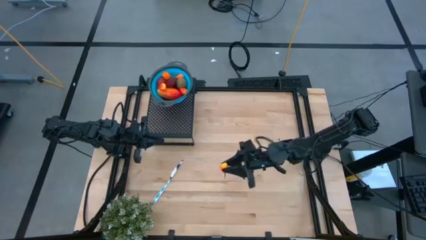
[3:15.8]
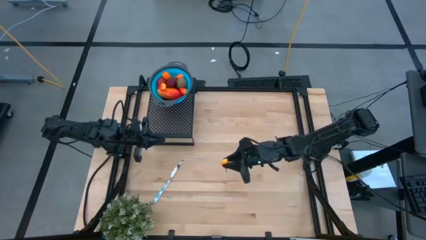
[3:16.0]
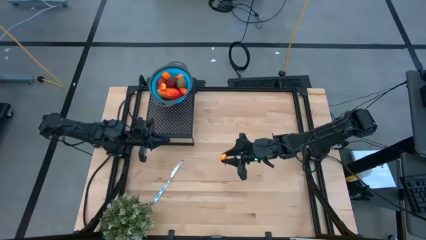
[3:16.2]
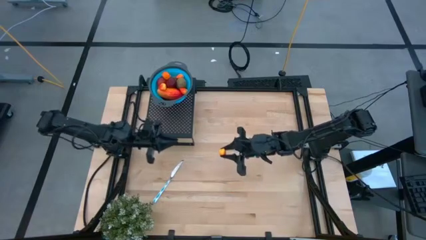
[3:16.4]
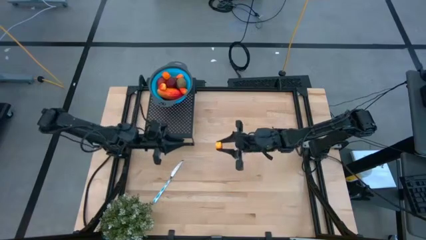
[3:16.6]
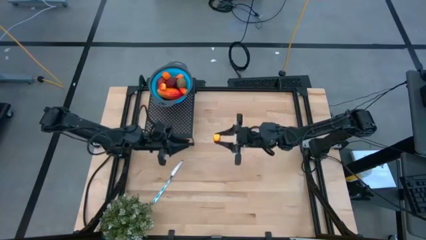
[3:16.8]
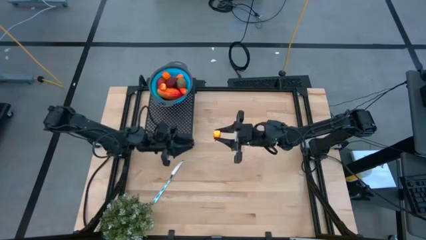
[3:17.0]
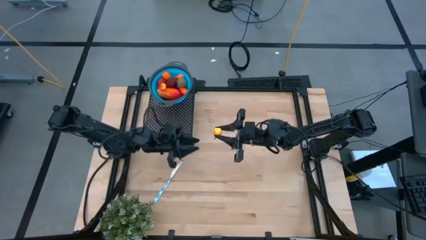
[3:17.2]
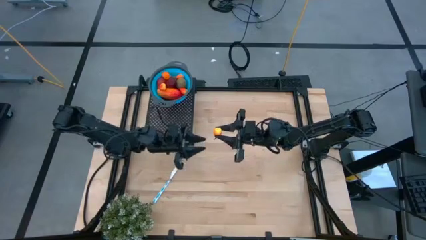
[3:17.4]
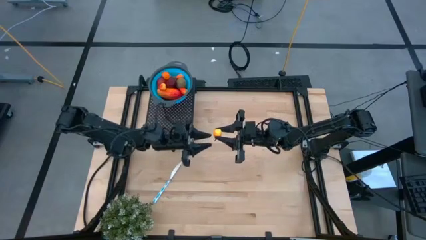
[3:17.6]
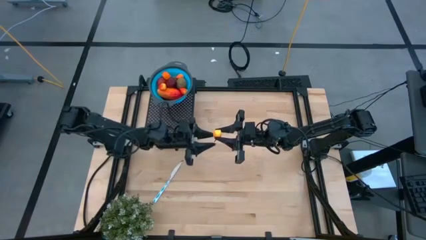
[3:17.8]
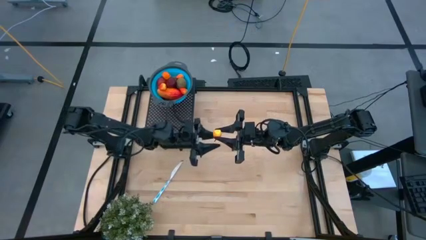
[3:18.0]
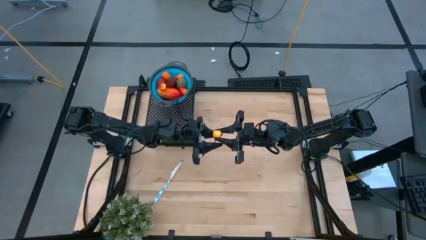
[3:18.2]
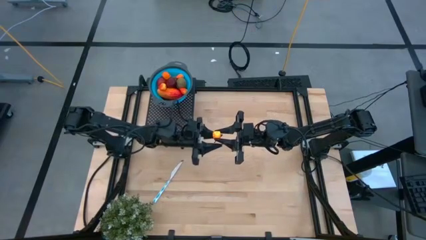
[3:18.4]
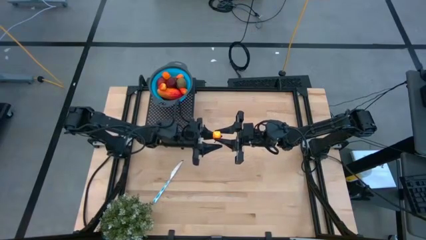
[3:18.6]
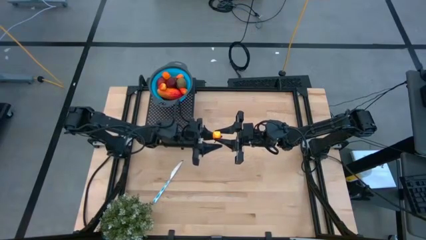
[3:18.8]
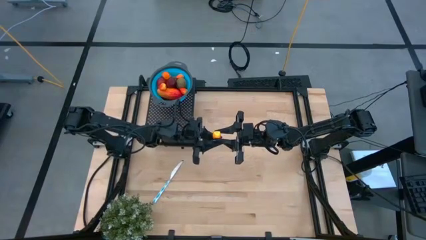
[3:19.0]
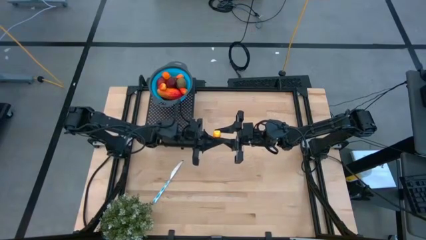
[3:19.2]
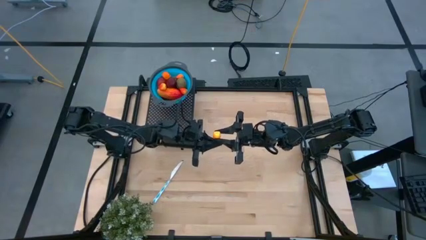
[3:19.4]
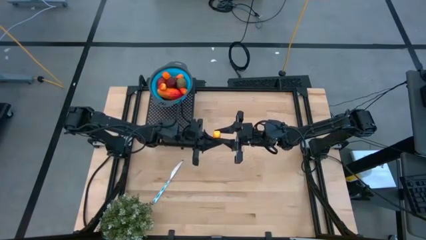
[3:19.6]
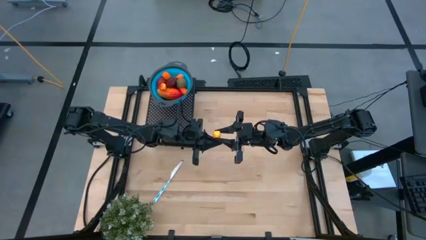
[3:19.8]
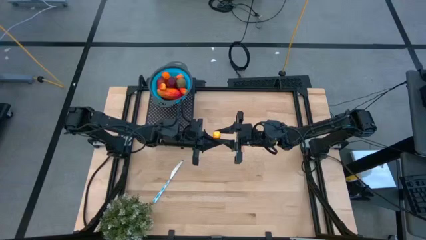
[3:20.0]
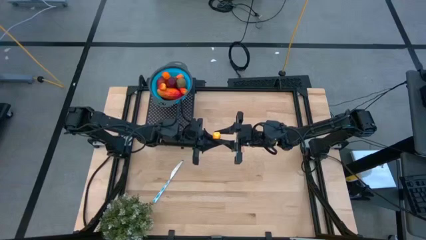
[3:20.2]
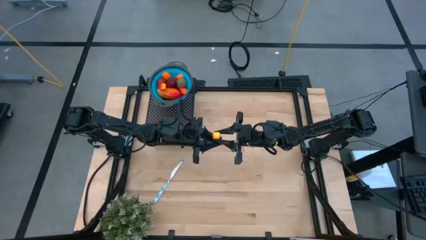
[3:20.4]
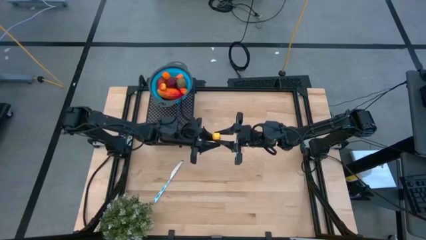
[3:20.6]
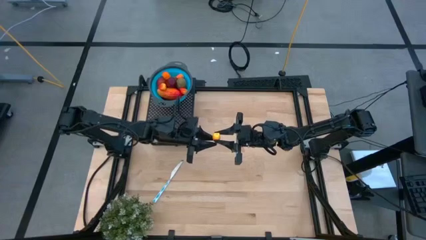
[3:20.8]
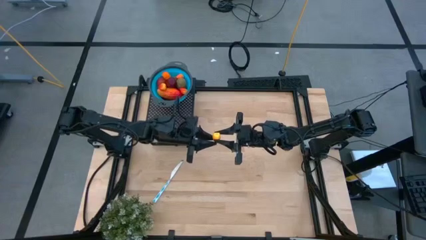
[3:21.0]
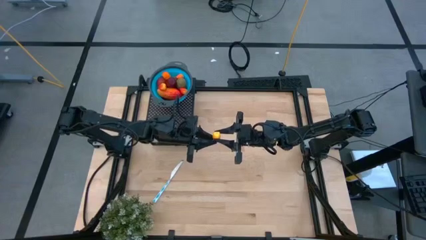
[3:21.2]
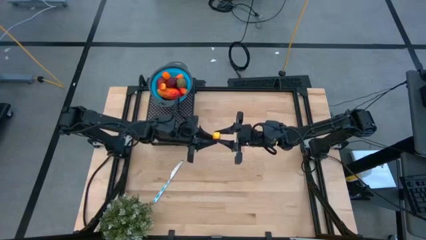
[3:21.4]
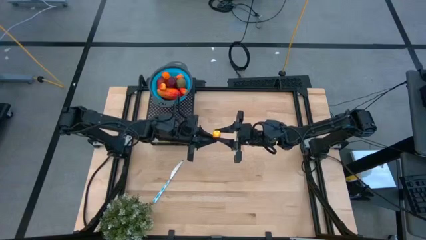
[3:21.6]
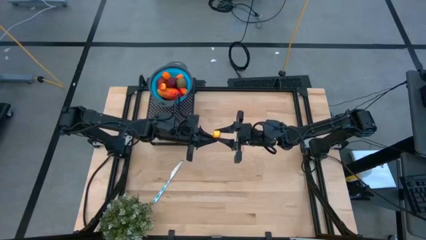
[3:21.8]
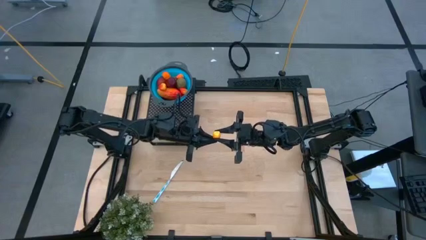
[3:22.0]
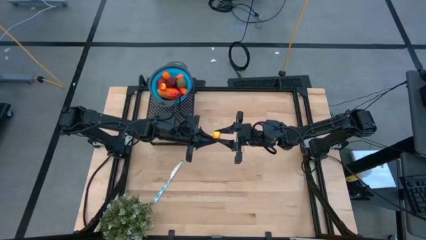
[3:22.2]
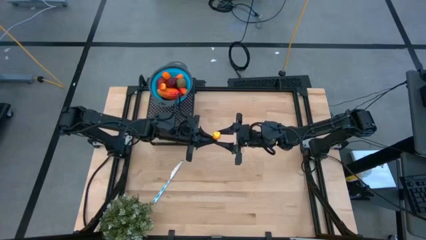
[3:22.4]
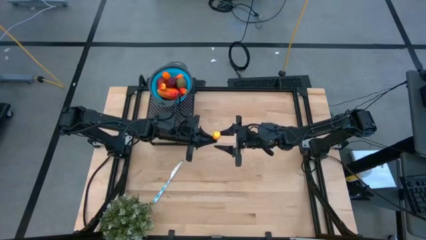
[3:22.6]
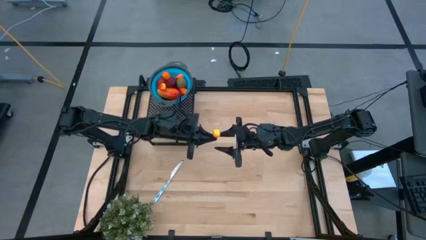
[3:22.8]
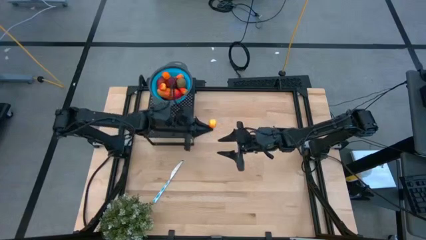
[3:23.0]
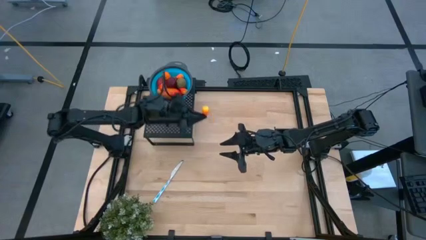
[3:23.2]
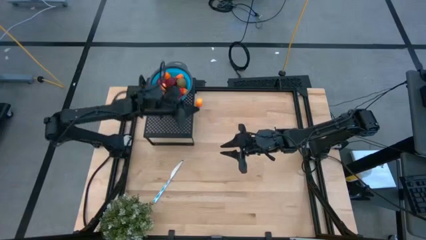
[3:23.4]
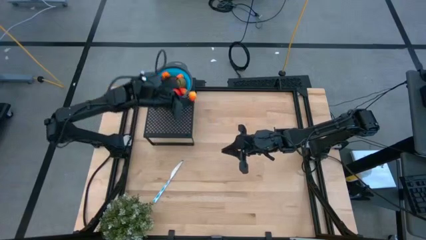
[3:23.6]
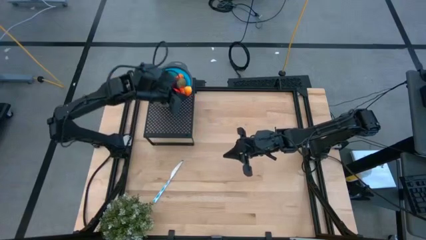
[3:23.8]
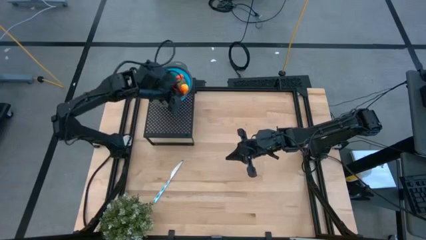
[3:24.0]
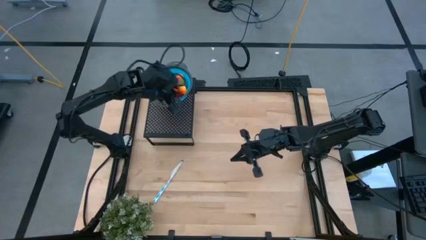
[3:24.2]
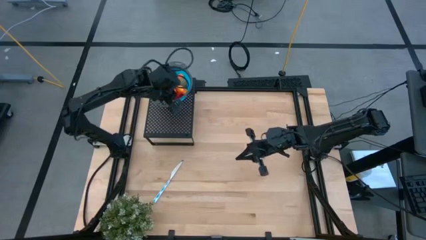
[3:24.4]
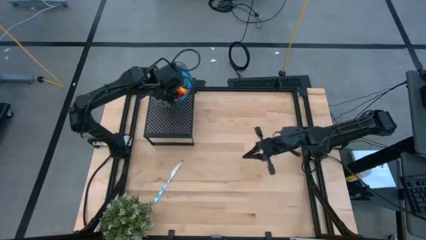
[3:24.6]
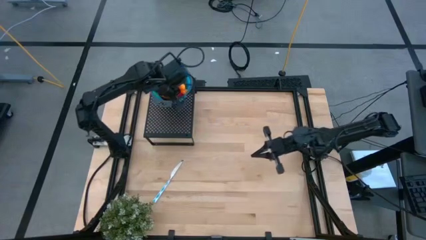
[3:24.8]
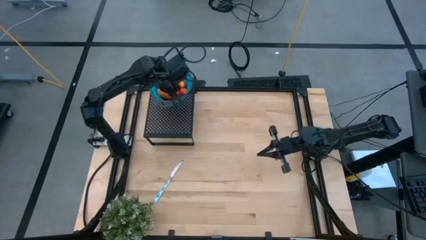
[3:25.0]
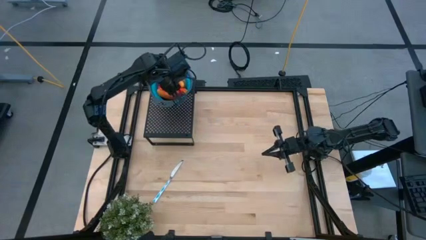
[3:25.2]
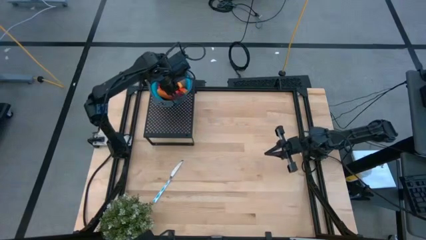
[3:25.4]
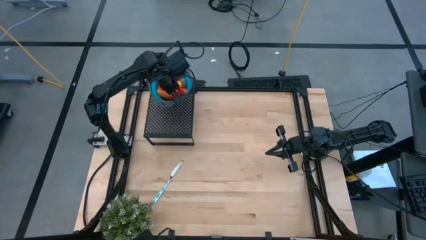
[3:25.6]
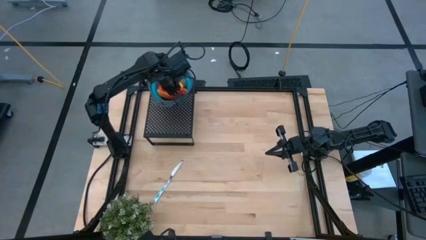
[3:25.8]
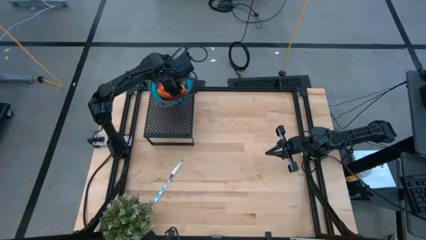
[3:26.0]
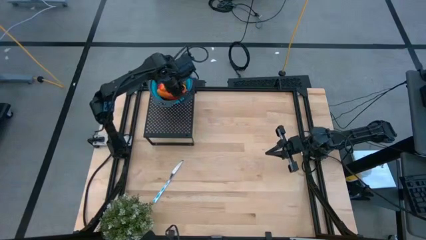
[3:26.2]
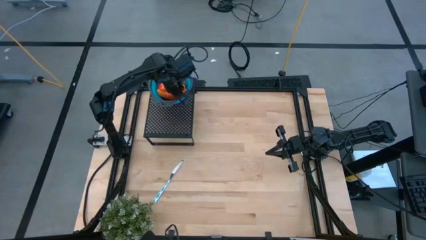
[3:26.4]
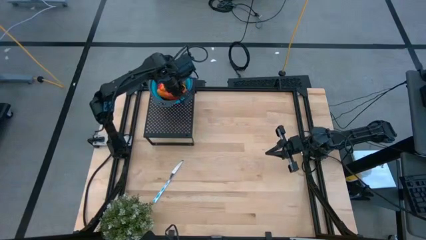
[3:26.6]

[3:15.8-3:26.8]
Task: Pick & Place Fruit
Put the orange pear into the blue strainer bowl on the shelf

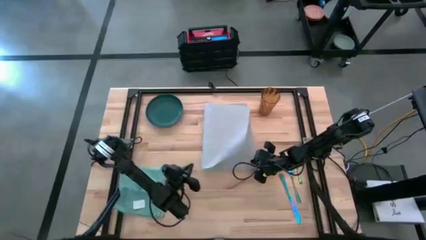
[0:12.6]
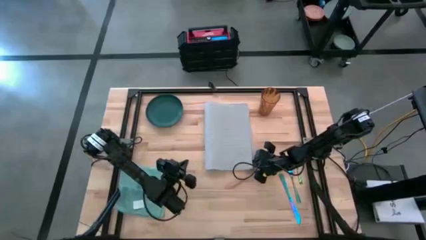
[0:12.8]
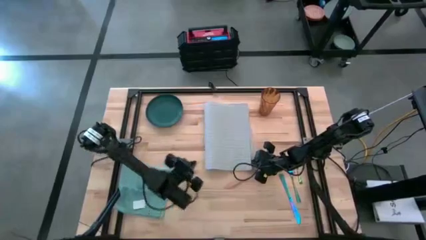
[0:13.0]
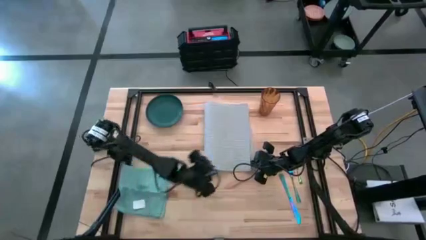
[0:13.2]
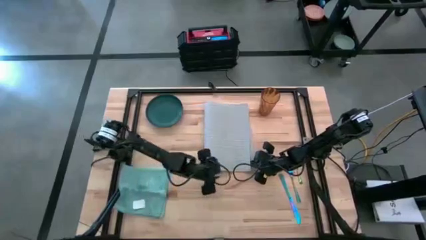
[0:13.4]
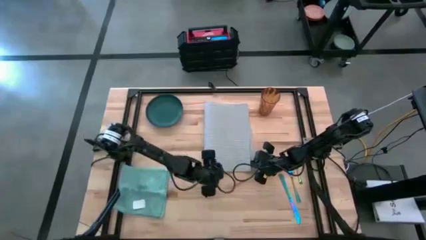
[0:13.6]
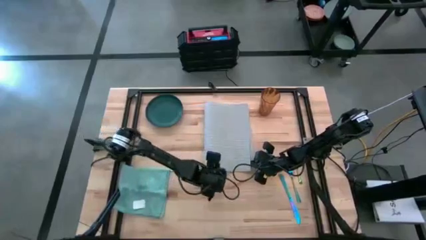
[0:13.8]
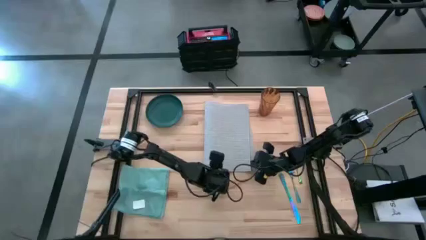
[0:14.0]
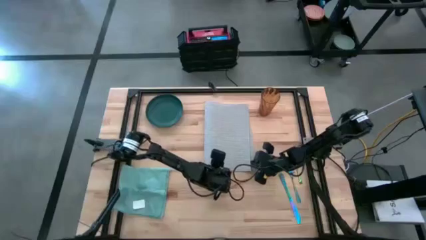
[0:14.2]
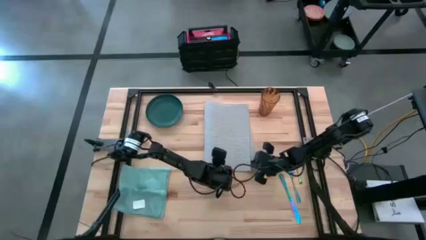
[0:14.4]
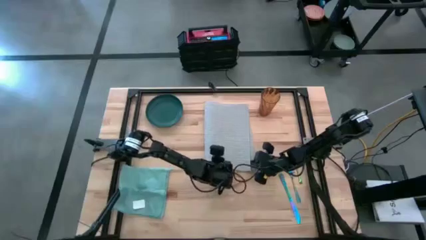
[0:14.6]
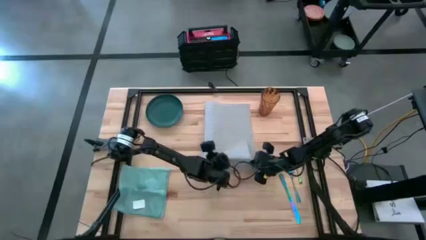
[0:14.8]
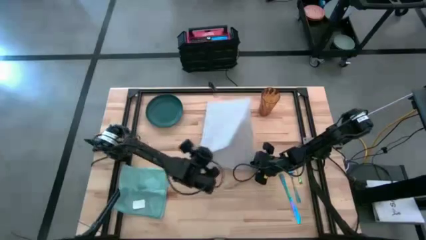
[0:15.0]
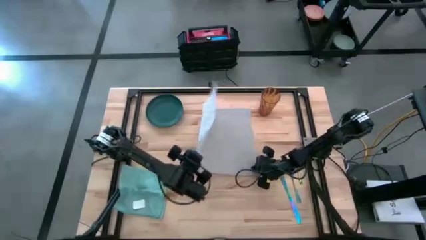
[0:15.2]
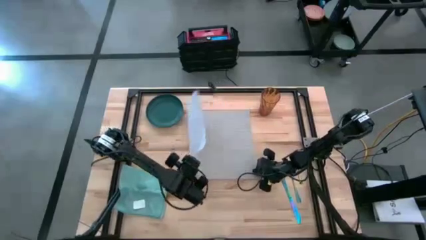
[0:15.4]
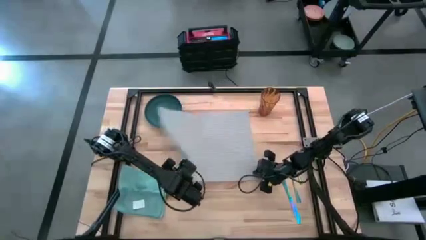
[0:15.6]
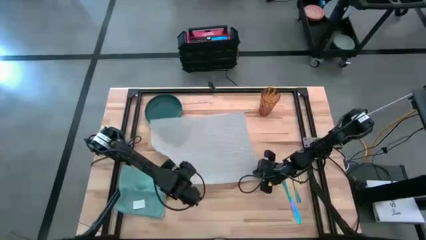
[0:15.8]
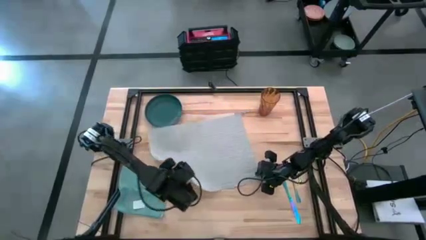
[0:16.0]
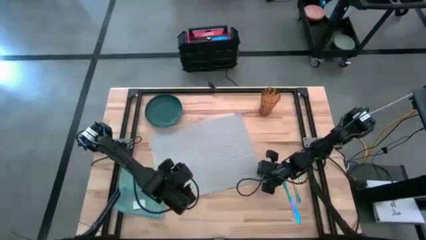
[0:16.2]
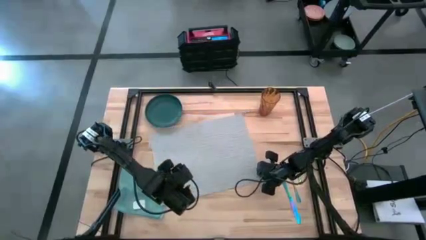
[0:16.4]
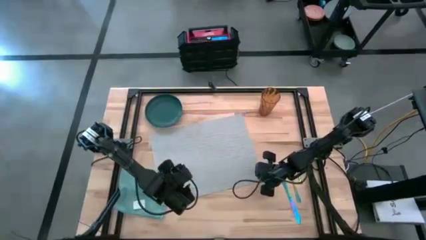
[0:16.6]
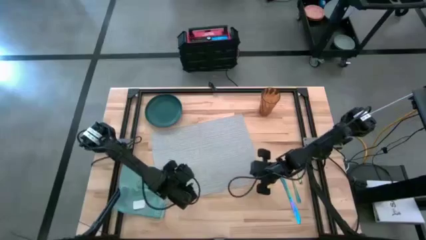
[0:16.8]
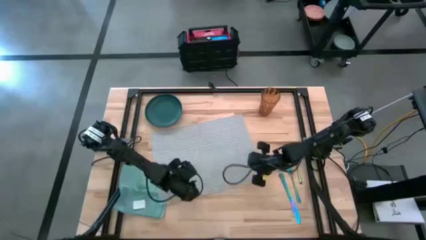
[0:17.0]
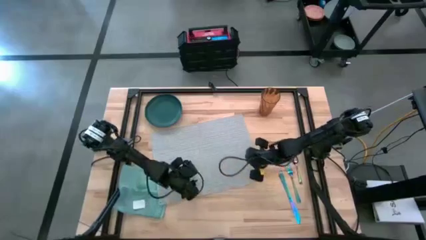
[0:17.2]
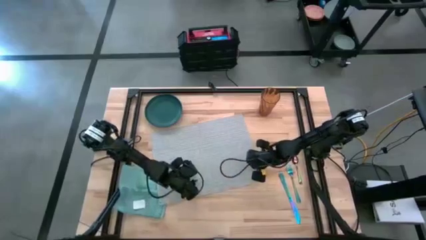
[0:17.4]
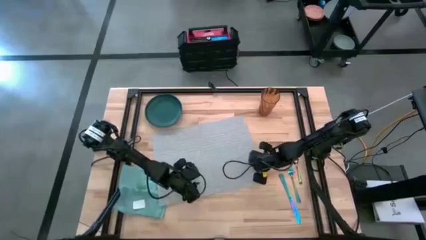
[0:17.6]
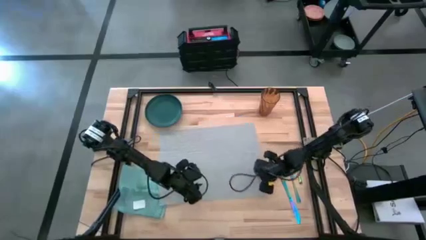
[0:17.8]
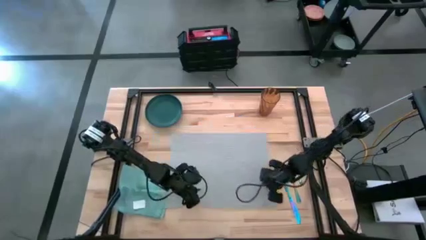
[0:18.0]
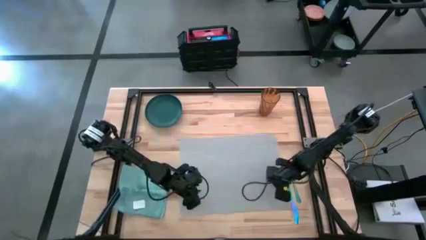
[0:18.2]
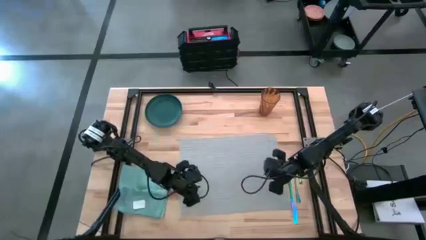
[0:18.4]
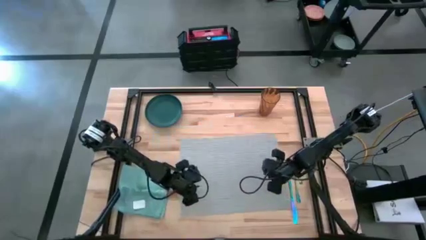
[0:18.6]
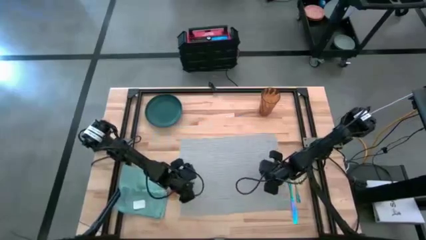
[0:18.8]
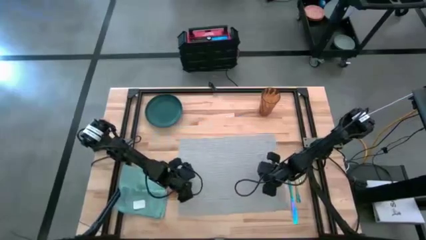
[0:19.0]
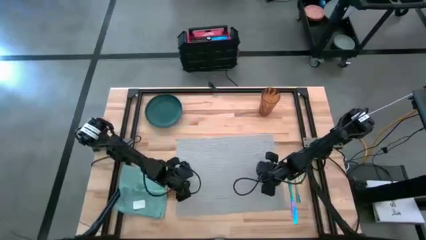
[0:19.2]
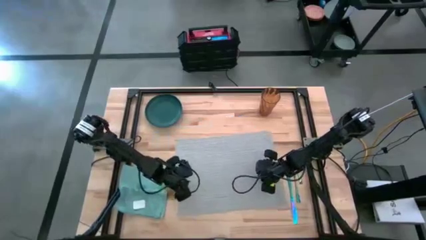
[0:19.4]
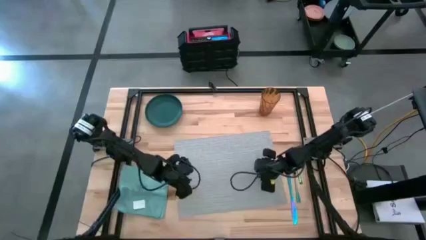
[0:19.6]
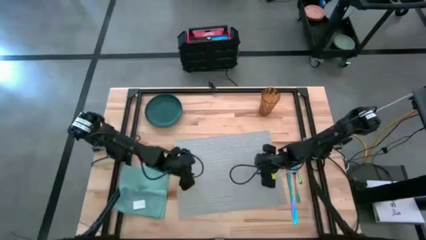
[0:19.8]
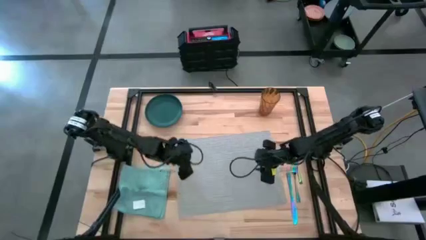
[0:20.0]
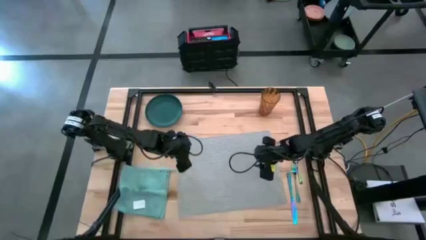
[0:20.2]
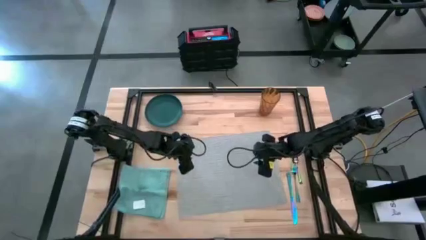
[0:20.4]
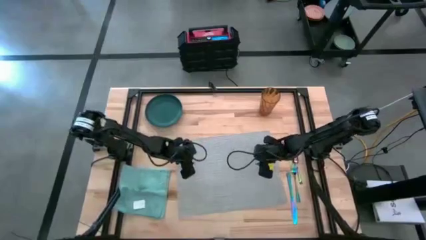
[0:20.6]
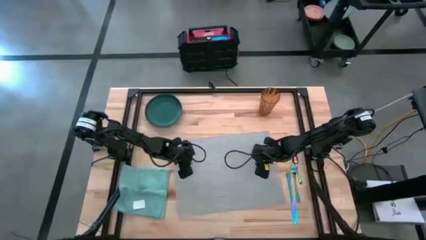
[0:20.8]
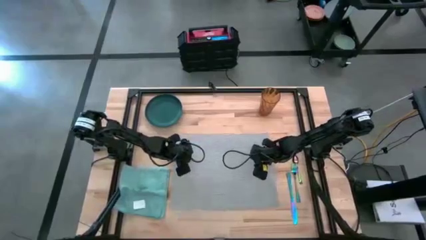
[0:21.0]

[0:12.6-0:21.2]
Task: Set table place
Move the gray tablemat to the center of the table
